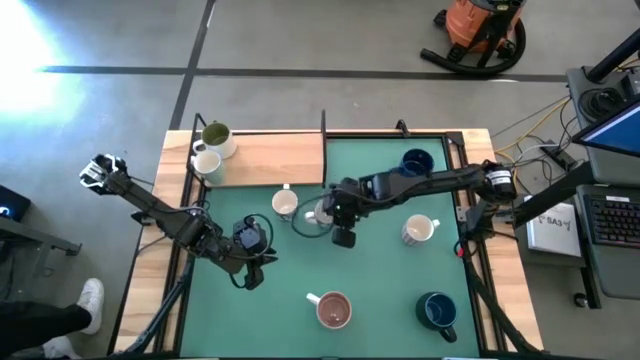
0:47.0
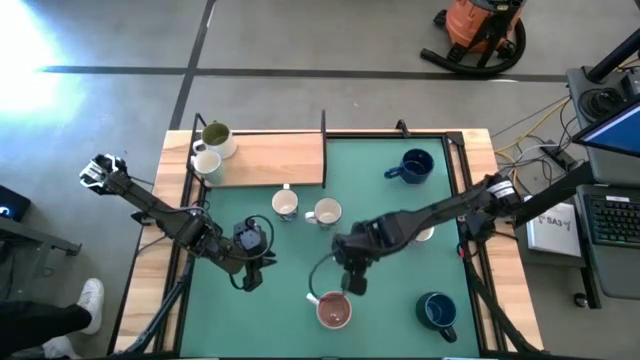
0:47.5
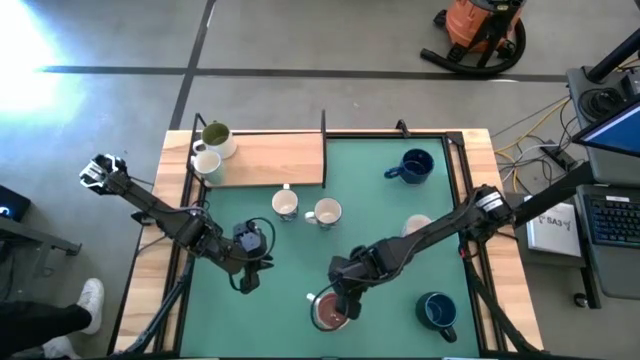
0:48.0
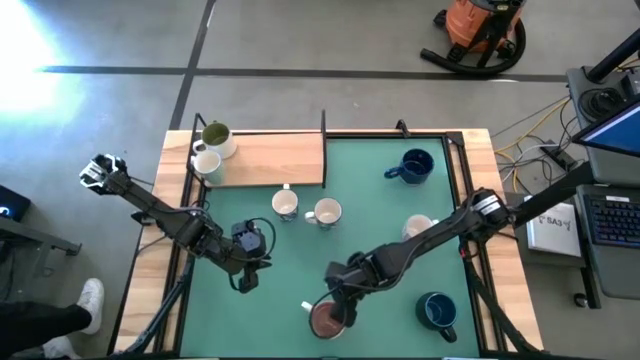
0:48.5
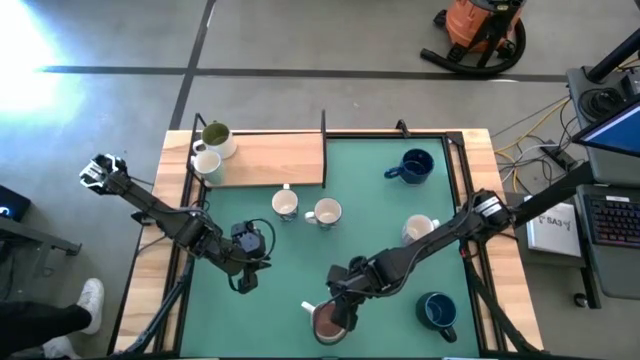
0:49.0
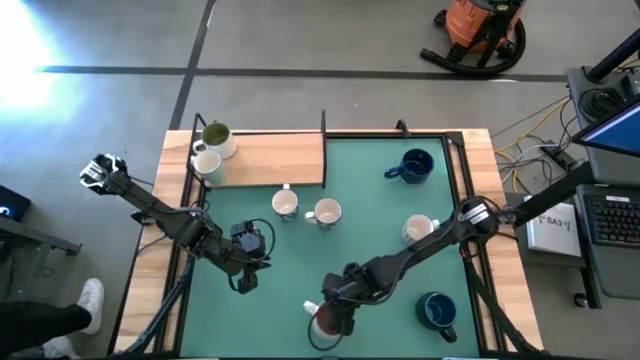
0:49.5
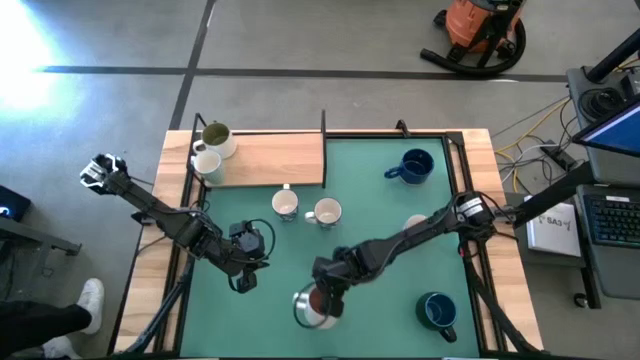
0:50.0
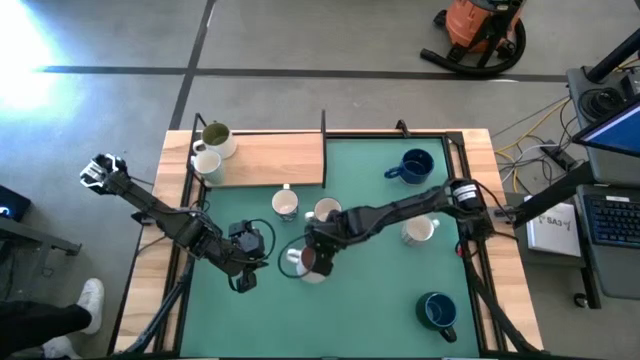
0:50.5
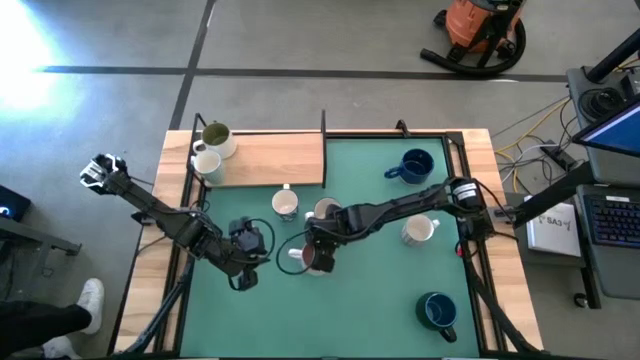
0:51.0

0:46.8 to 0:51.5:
Task: Place coffee mugs
Move the pink mug to the center of the table

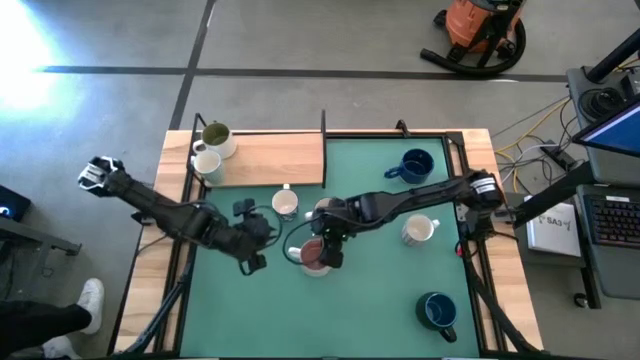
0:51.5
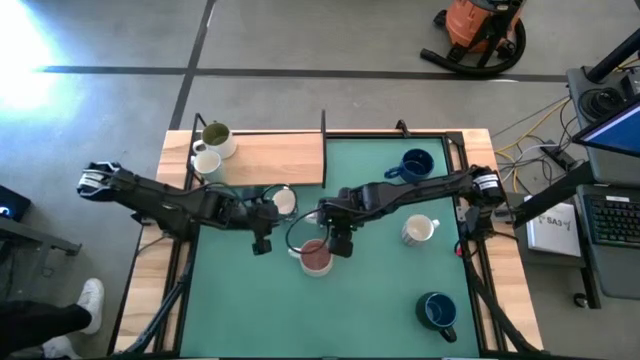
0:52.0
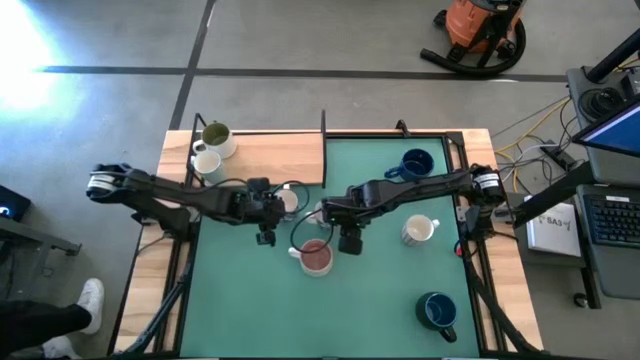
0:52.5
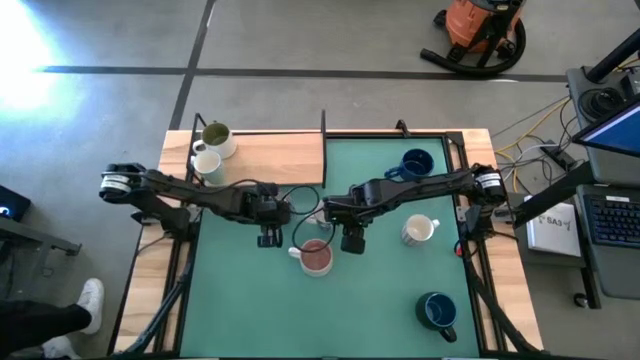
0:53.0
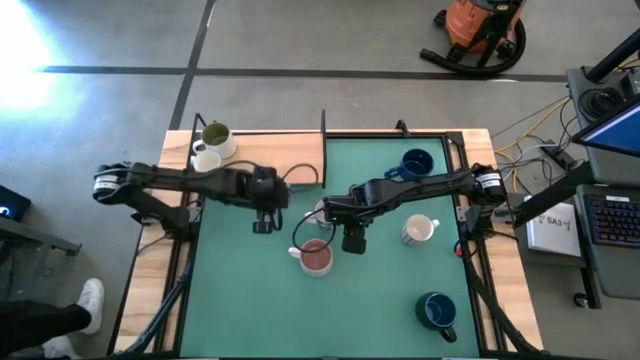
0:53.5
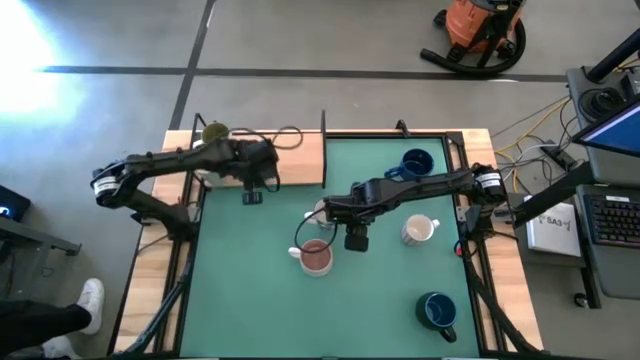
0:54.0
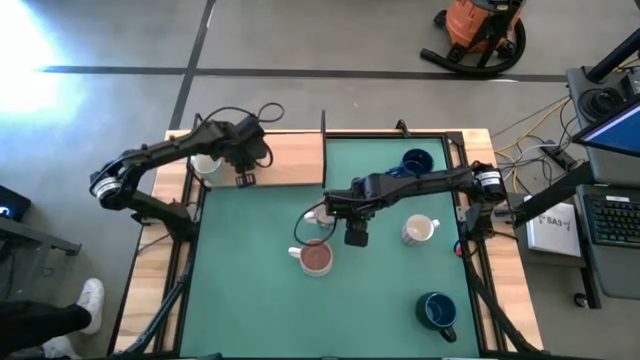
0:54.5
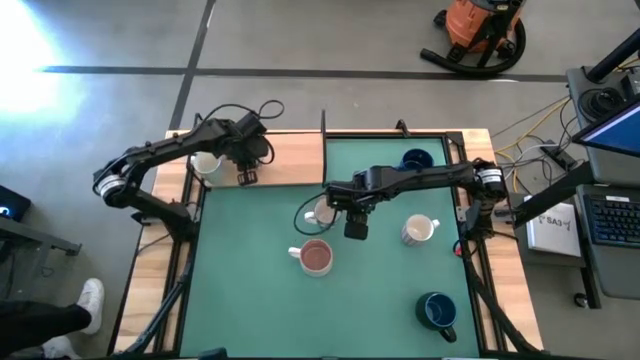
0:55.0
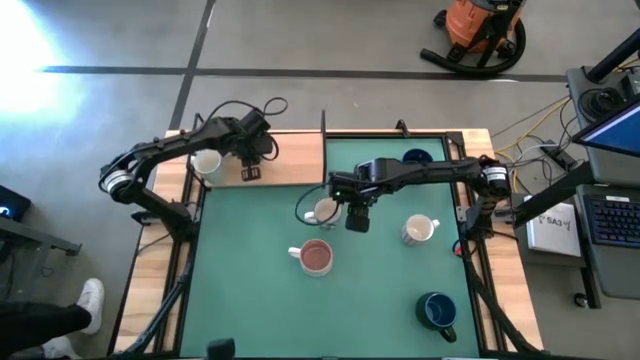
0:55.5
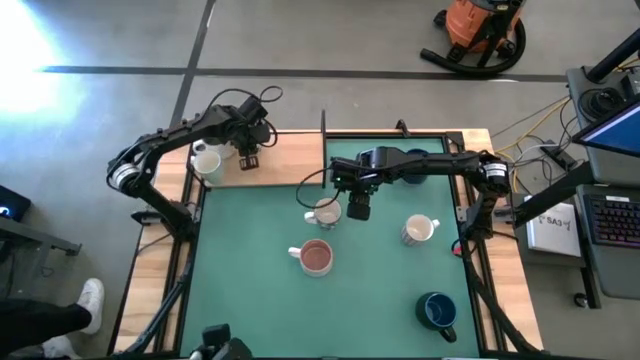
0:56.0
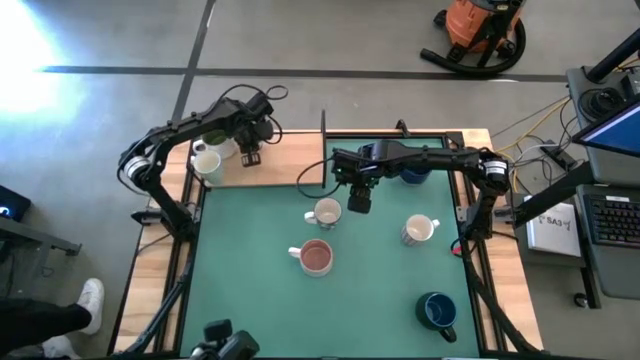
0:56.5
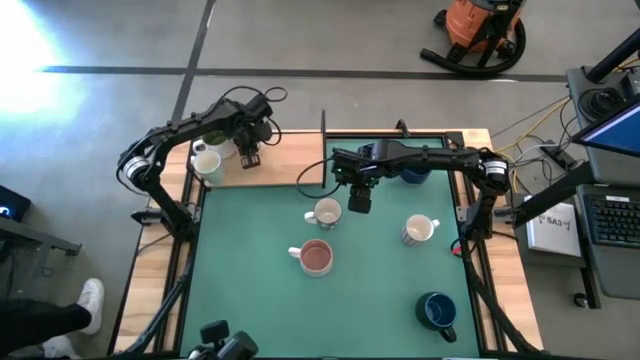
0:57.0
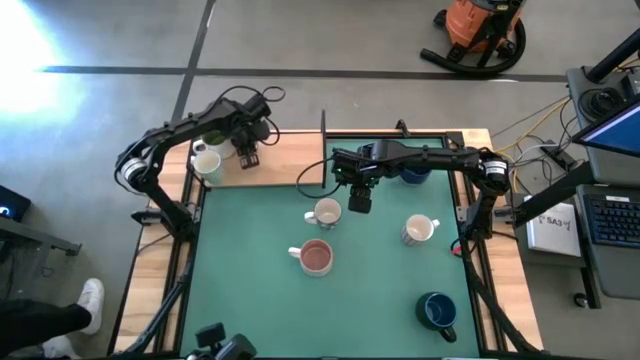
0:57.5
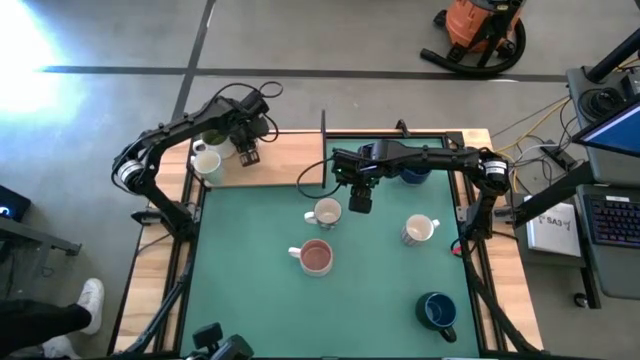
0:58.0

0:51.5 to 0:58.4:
Put the left blue patterned mug on the shelf

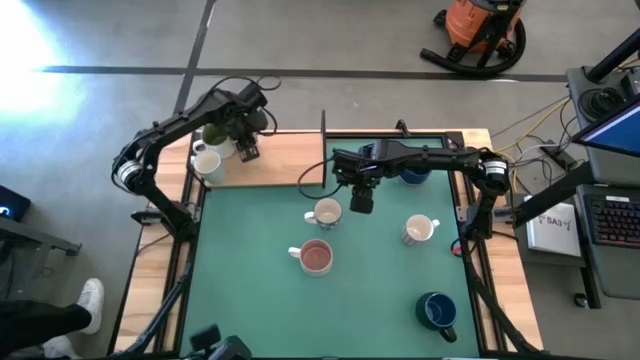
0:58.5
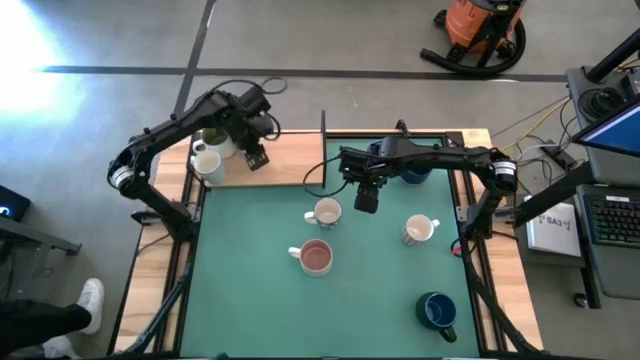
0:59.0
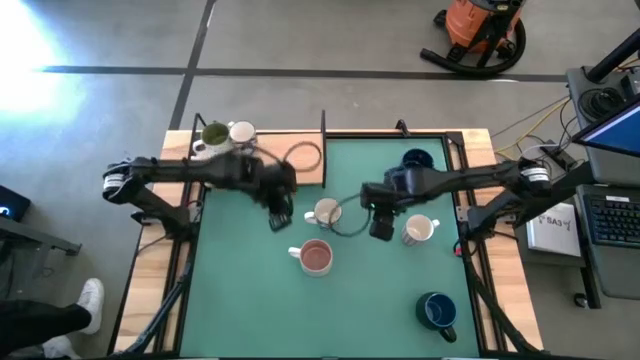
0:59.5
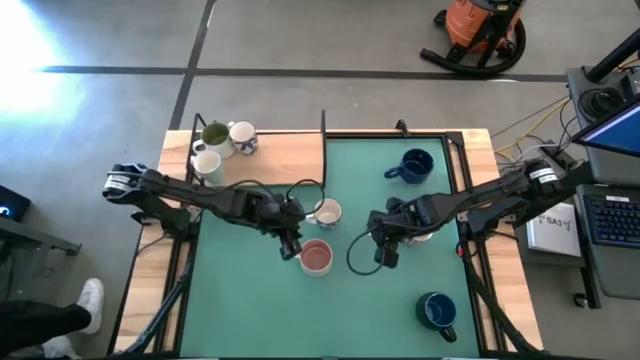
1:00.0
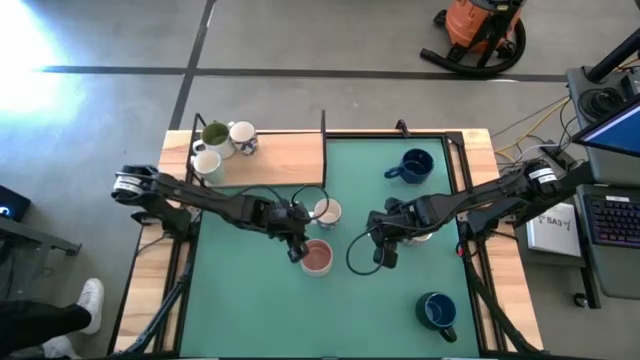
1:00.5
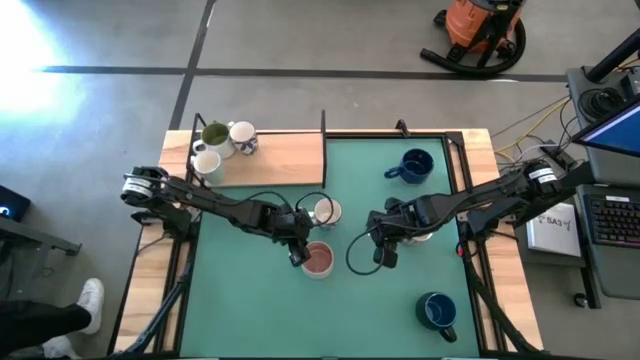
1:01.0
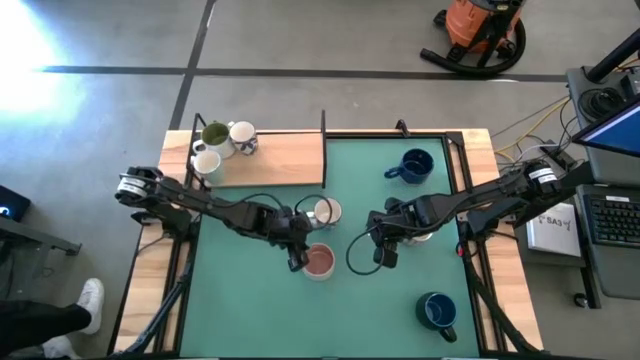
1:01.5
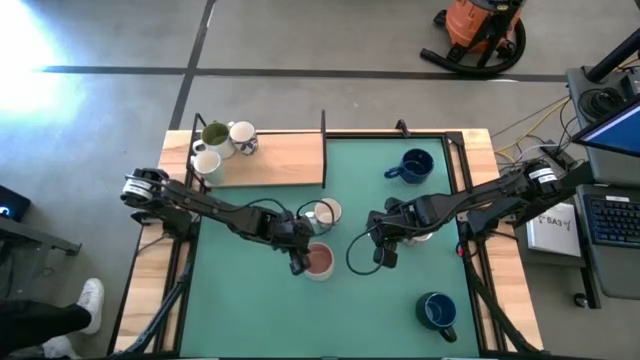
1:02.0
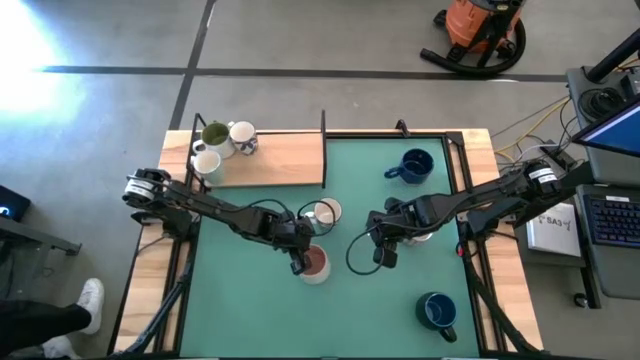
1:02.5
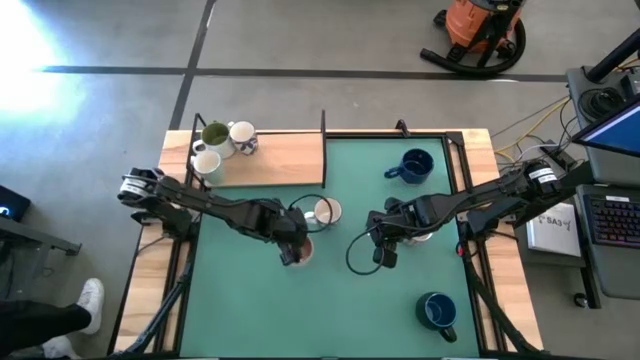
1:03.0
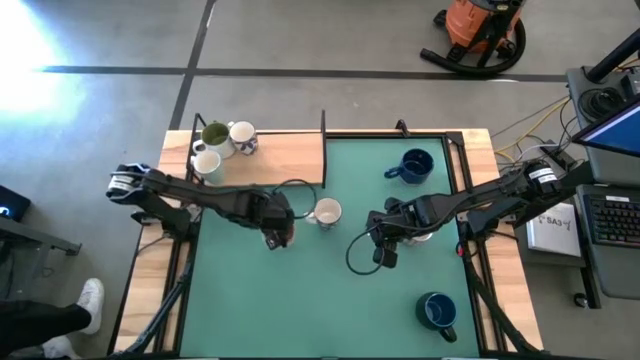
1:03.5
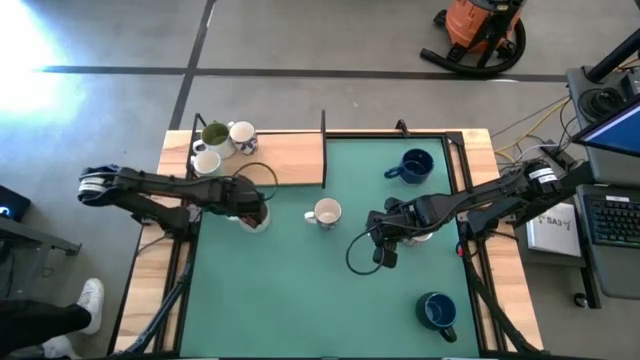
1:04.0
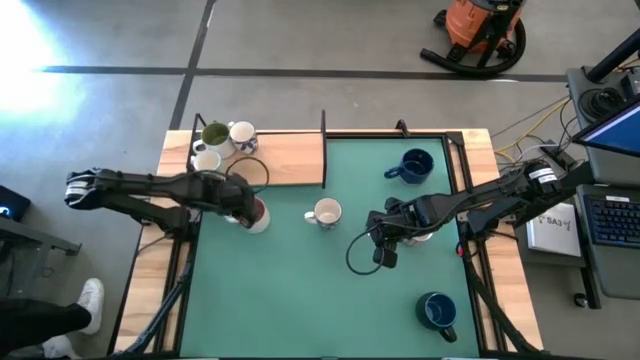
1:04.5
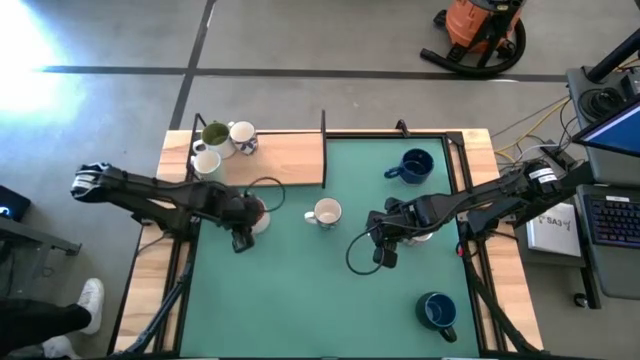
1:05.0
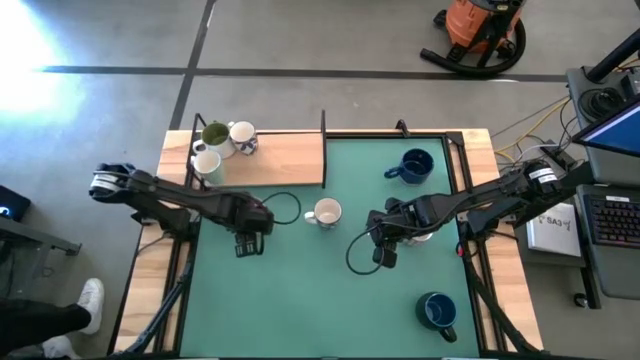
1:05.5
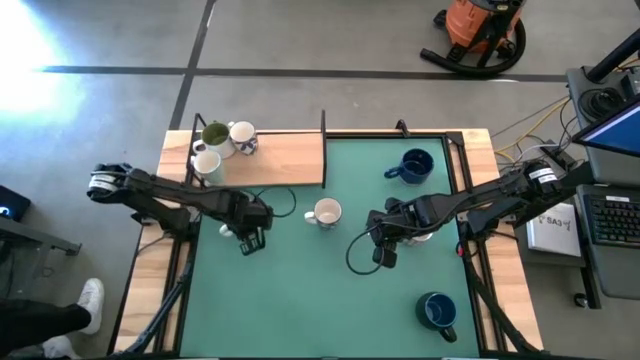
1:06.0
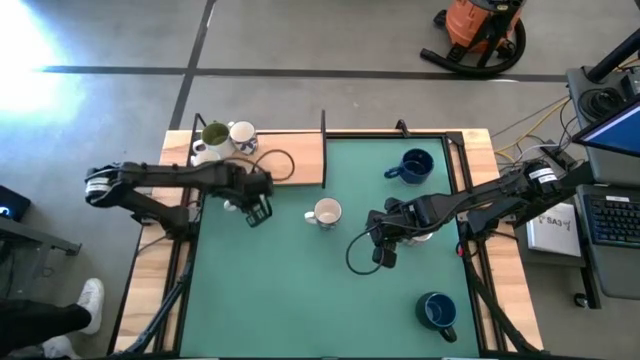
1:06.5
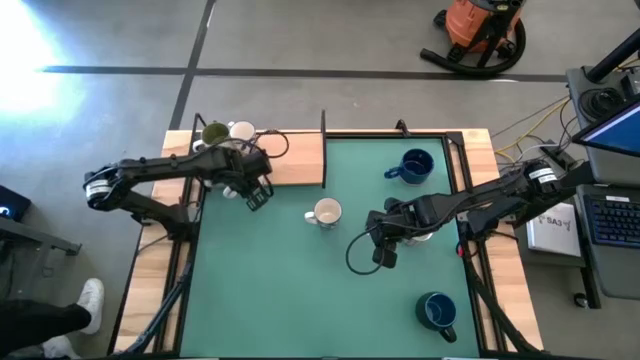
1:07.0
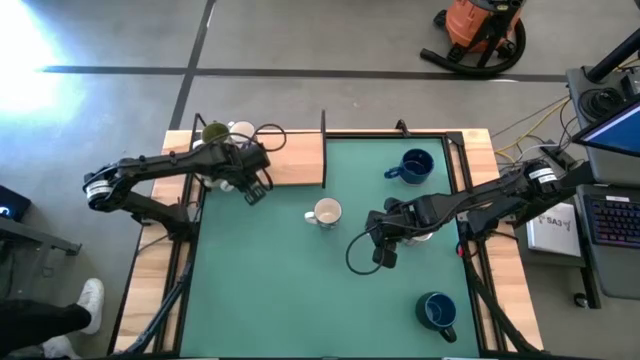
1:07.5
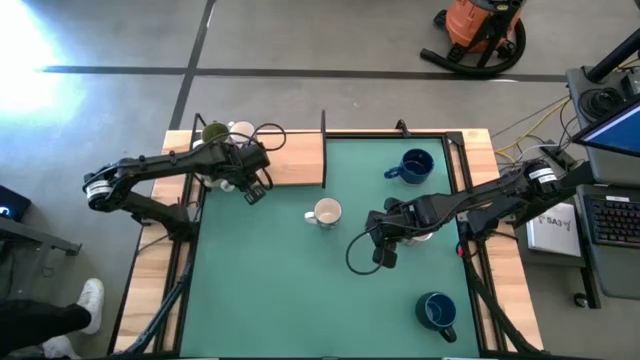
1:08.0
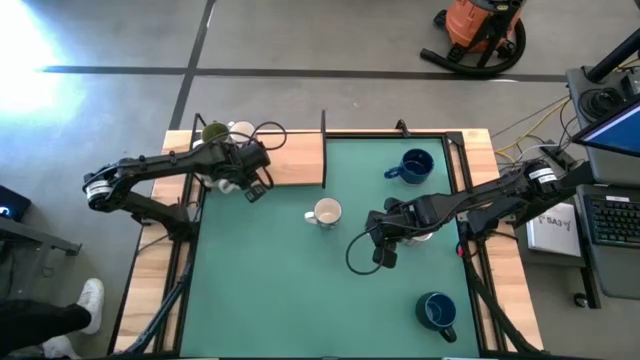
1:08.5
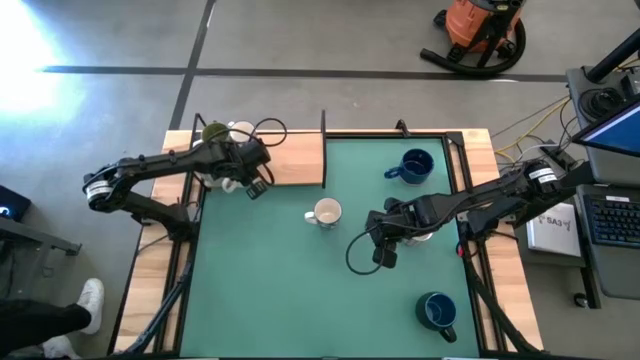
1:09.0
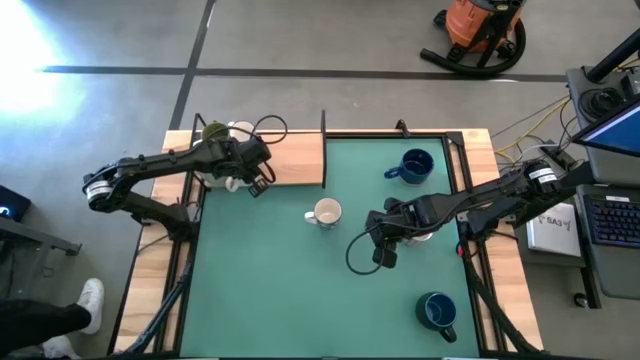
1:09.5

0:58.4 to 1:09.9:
Put the white-pink mug on the shelf
